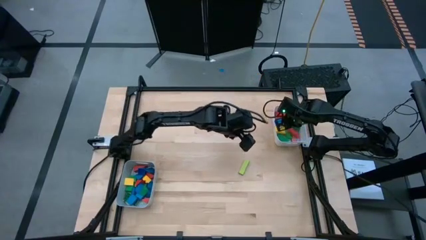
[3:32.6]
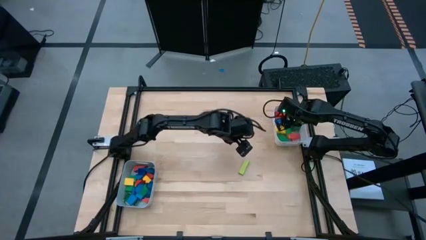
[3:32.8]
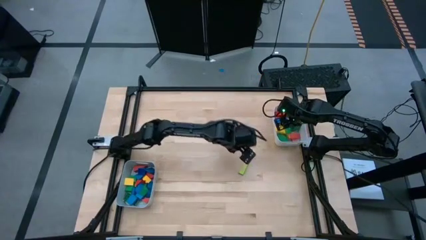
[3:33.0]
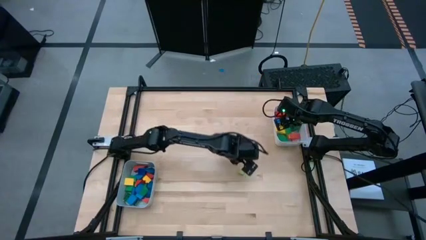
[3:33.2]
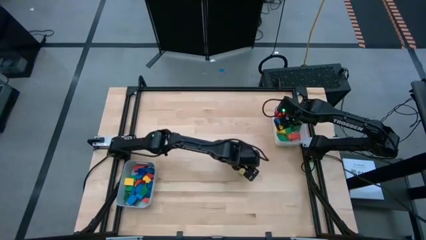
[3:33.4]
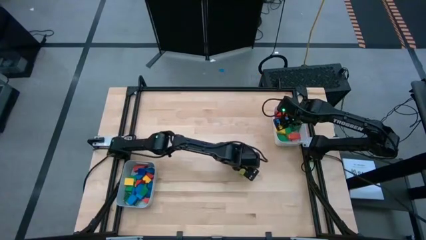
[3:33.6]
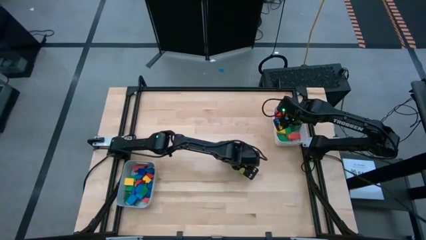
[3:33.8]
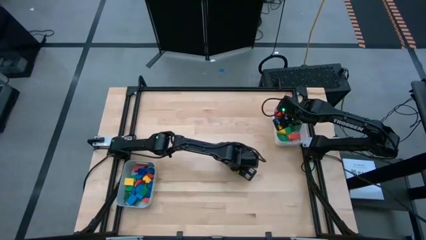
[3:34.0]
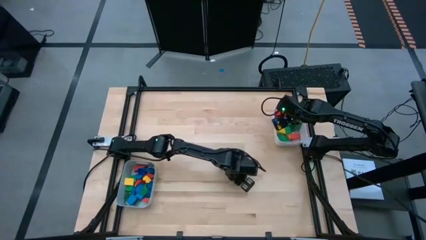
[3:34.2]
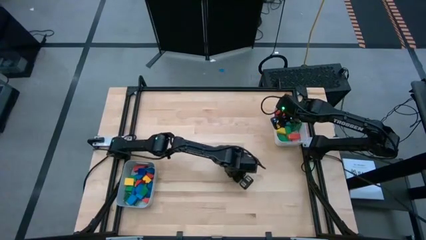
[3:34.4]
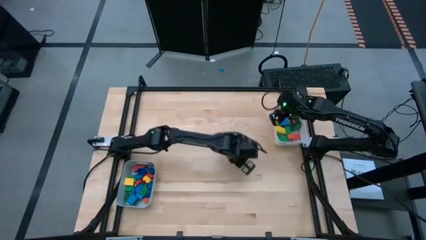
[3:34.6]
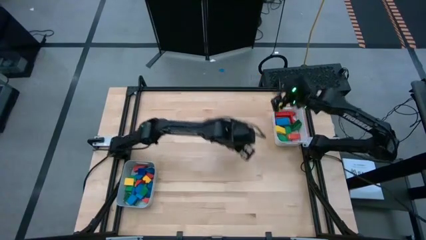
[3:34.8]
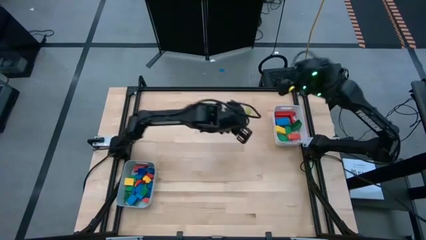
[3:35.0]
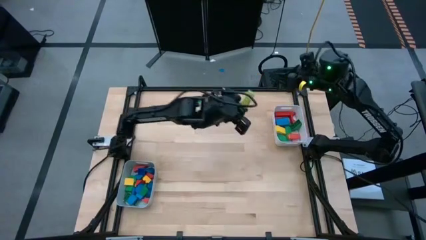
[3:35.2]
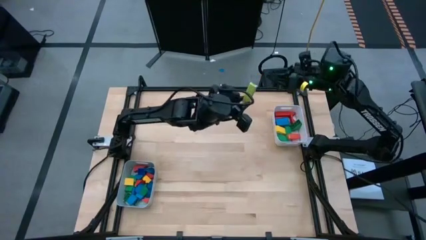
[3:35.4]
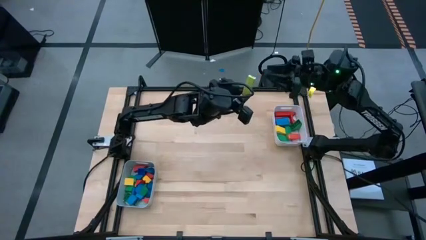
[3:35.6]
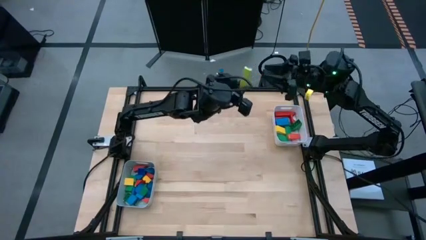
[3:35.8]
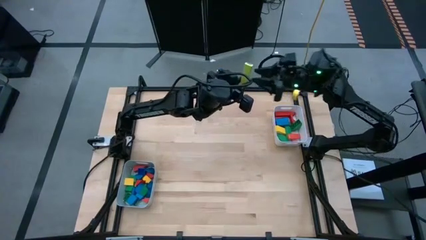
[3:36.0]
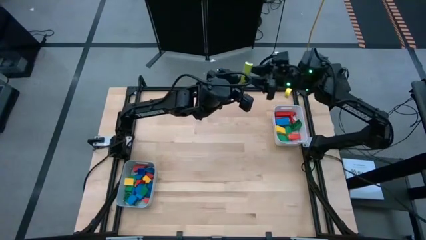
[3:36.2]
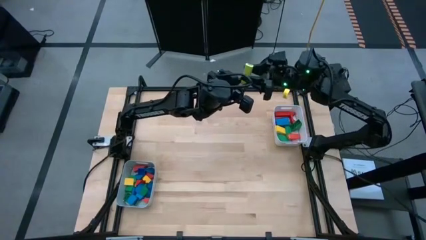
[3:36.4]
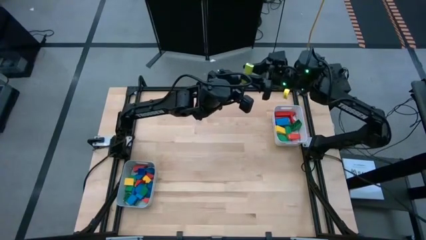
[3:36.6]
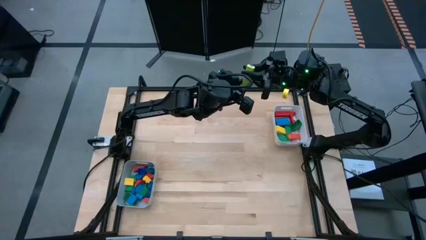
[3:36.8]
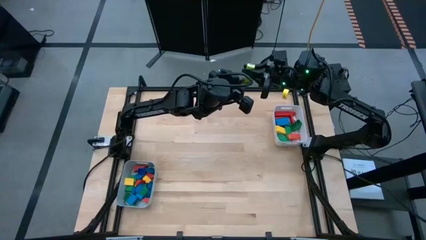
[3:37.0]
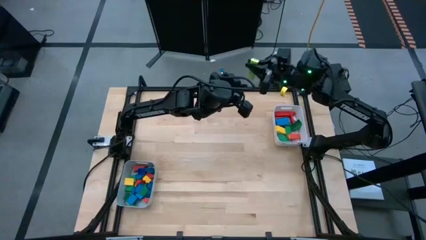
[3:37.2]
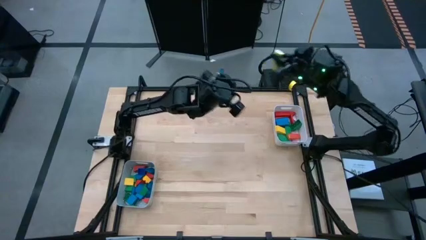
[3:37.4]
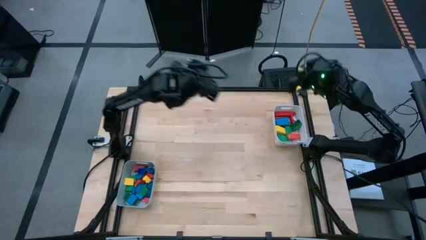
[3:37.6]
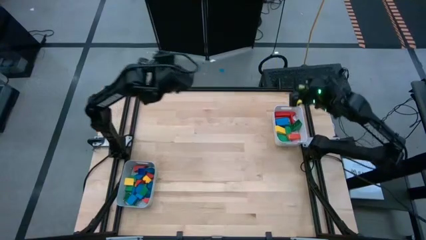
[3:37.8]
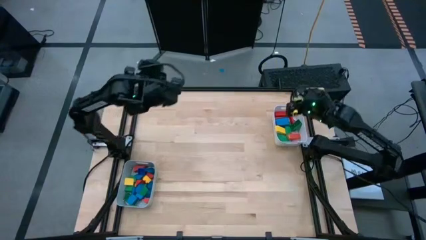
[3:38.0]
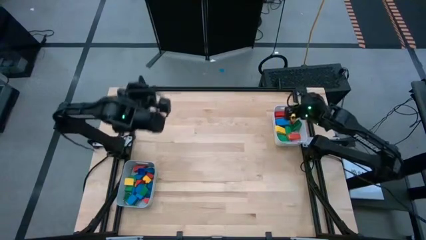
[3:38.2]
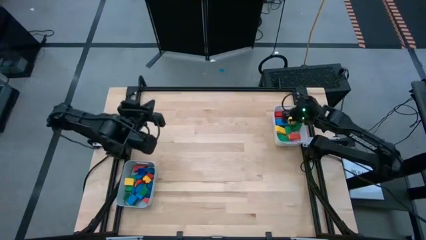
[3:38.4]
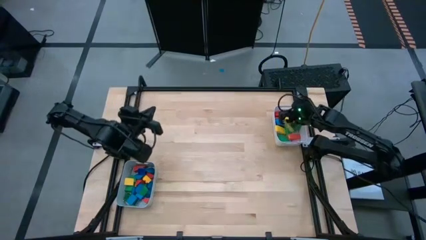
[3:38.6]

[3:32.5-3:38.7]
Task: Sort blocks by size
Put the yellow green block into the white bin

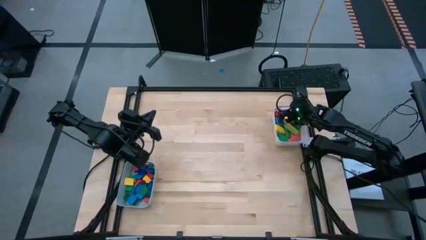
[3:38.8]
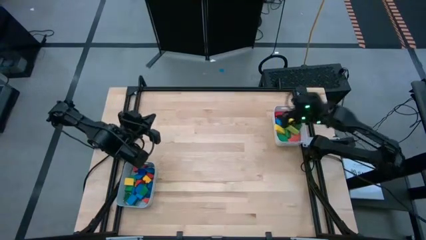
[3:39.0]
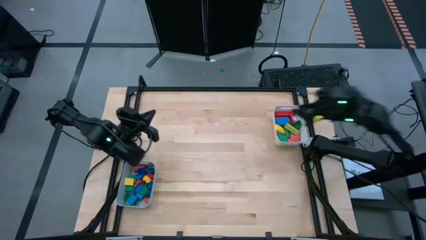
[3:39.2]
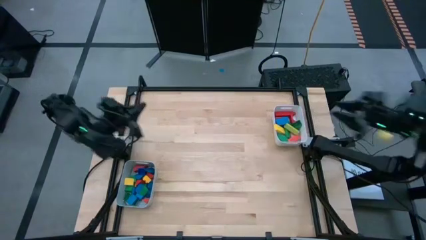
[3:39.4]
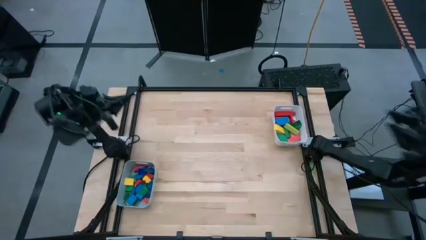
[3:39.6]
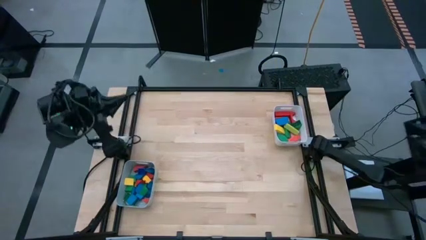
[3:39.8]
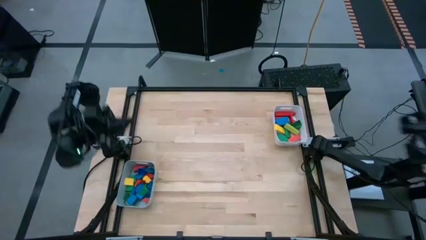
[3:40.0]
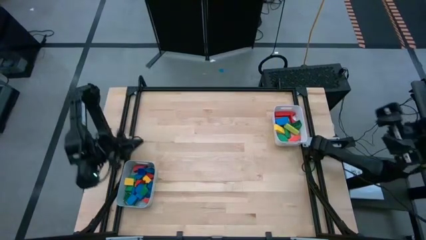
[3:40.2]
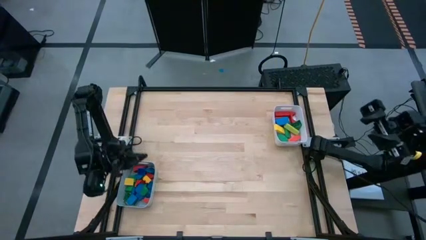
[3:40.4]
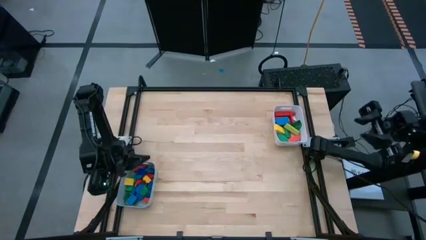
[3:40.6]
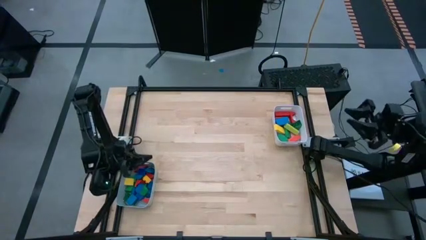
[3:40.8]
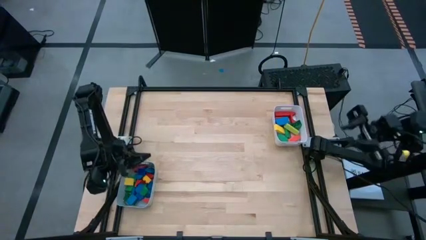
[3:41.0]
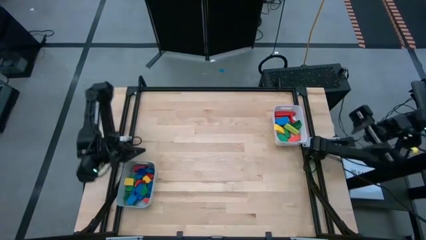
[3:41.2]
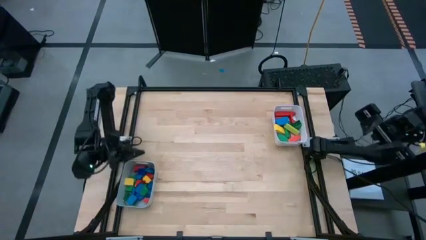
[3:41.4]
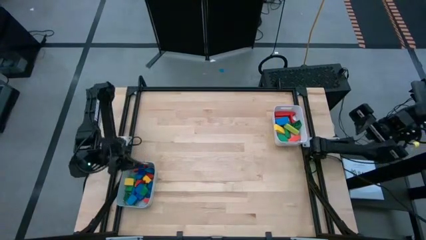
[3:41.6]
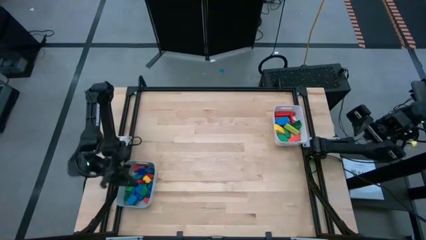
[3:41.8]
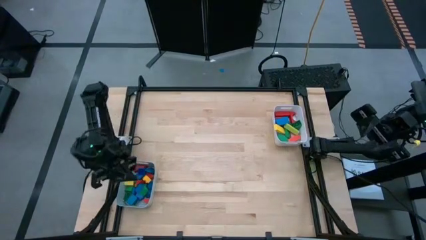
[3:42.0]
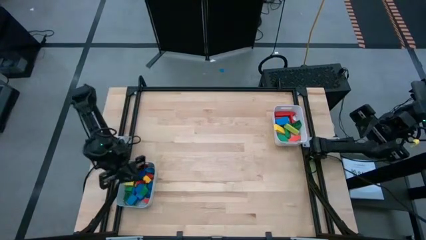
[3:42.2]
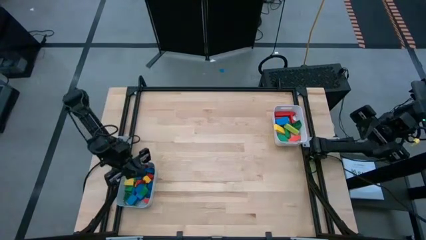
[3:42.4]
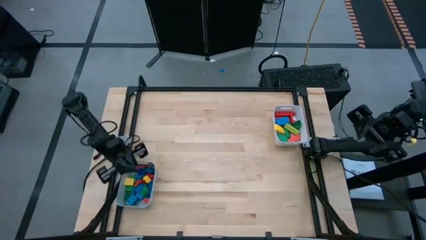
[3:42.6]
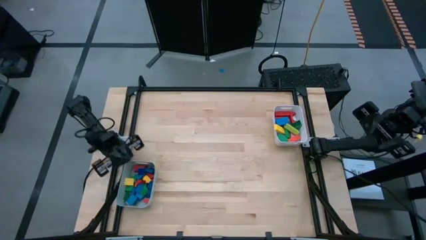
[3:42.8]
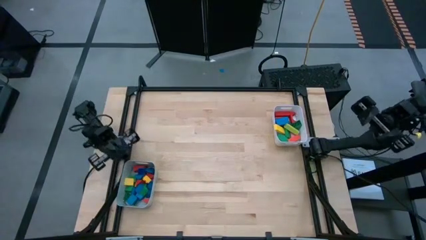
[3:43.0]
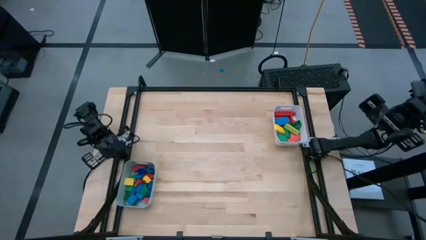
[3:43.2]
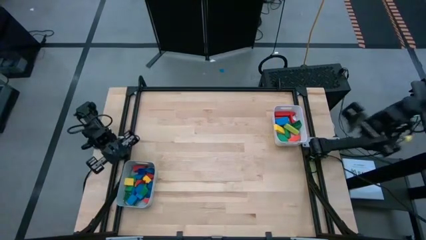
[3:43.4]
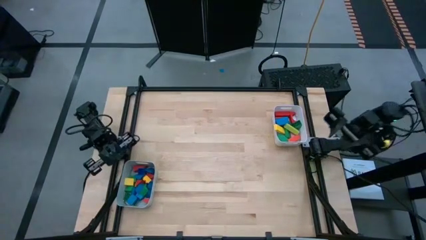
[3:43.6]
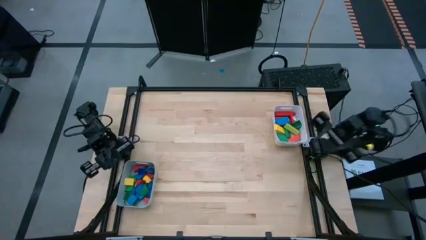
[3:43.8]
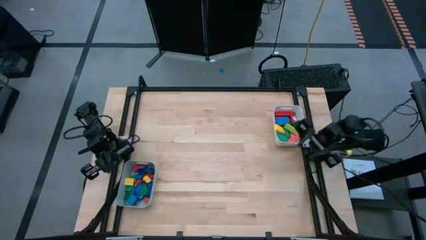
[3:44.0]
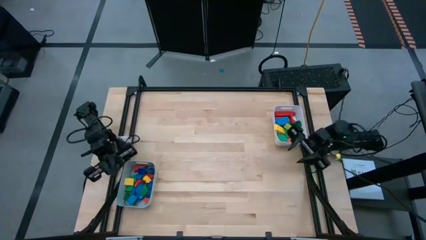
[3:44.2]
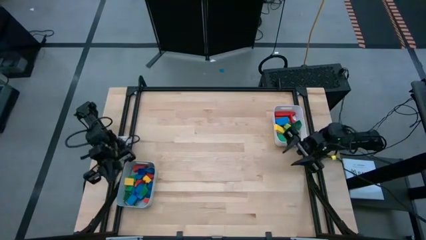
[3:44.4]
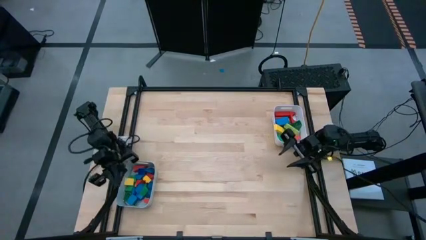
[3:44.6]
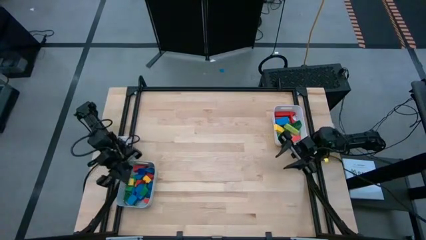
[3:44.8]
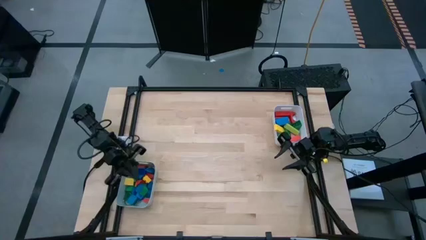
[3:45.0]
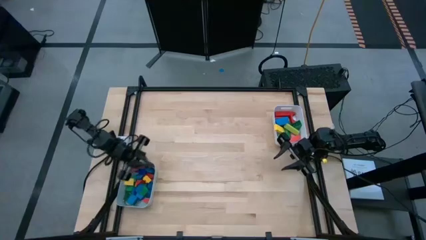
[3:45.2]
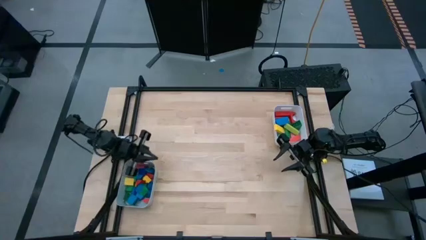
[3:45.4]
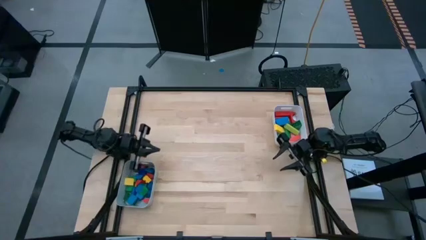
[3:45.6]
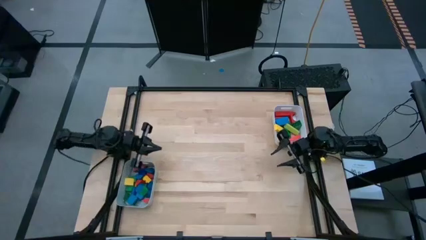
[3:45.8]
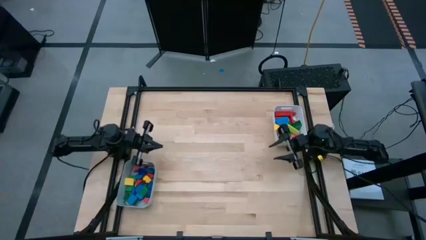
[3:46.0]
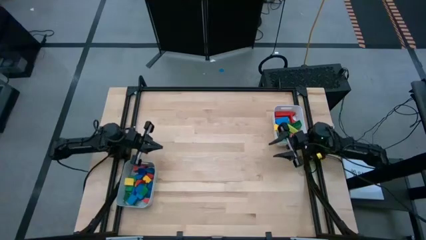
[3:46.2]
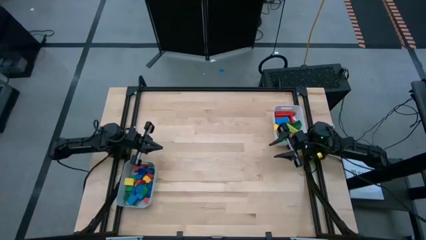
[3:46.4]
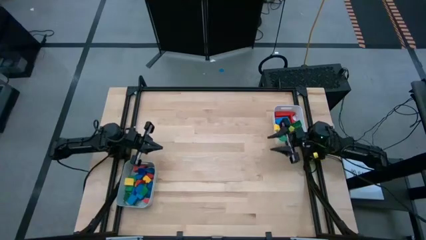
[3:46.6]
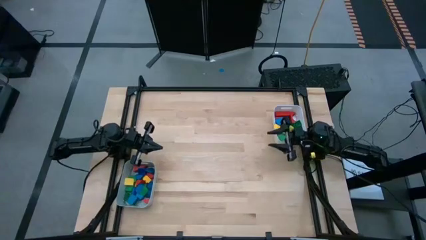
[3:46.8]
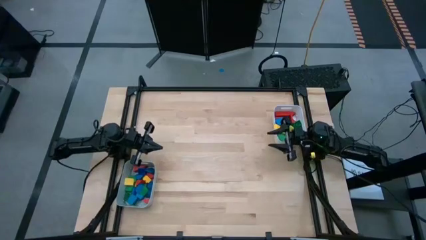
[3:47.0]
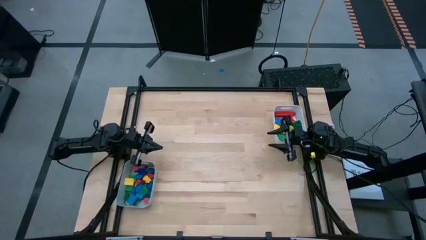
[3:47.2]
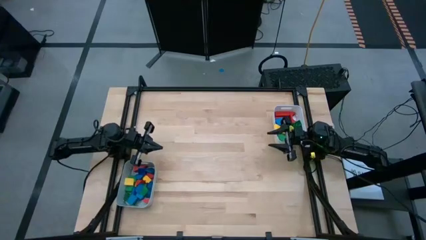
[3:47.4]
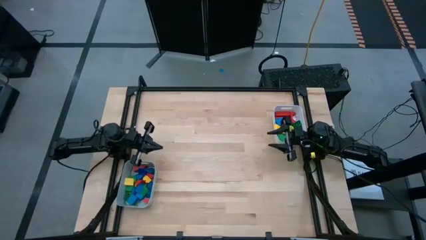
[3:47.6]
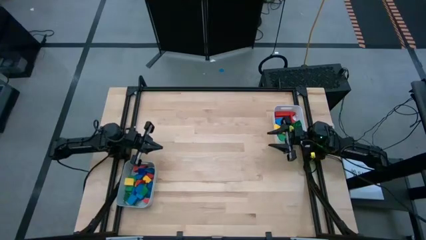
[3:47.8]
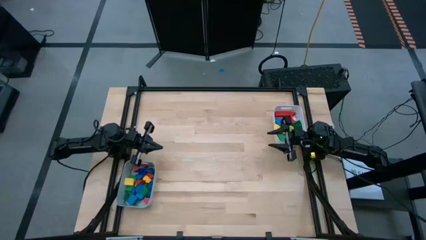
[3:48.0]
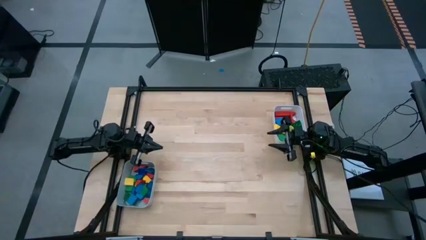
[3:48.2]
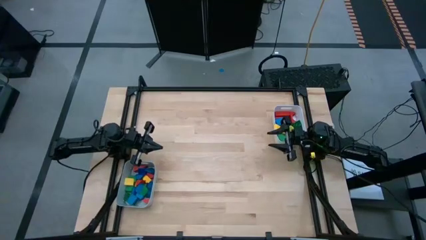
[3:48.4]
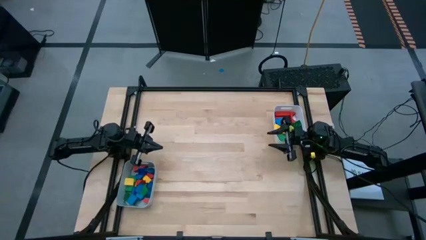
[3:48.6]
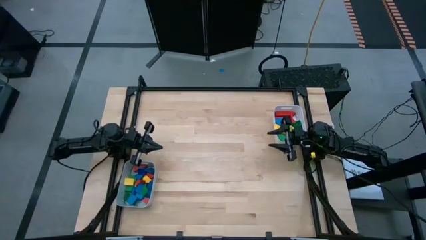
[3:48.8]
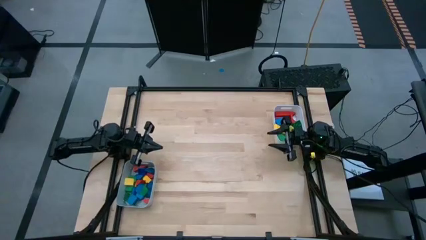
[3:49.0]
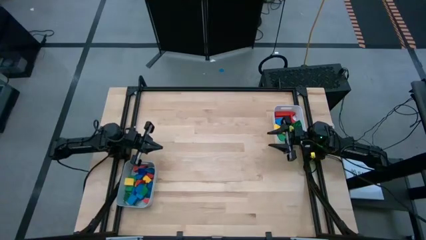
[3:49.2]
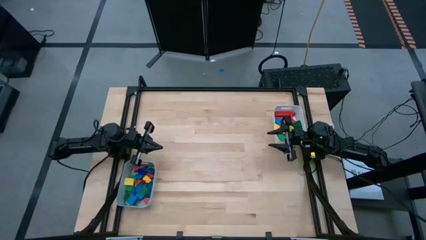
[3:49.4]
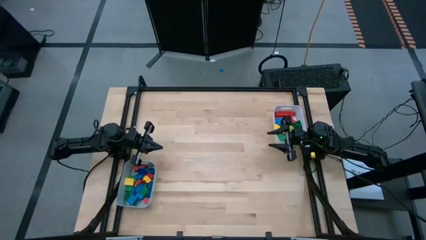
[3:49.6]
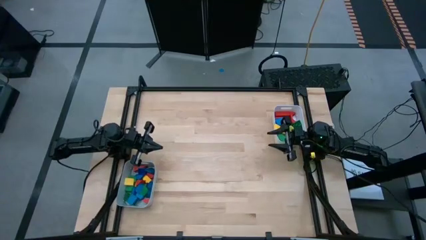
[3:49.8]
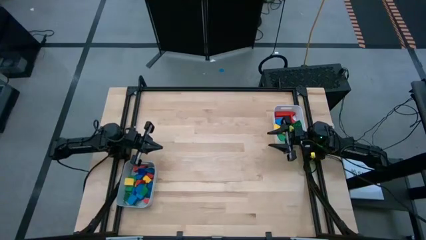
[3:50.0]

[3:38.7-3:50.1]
Return to Home Position
